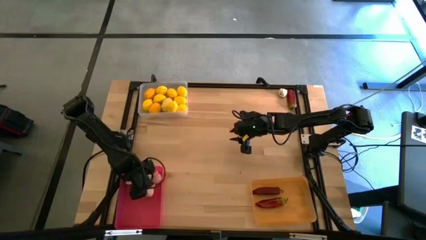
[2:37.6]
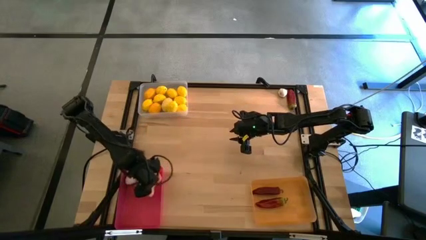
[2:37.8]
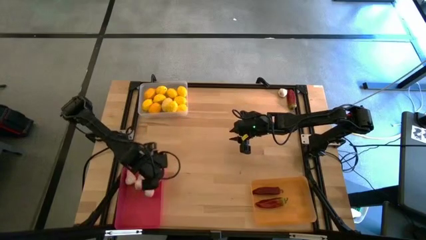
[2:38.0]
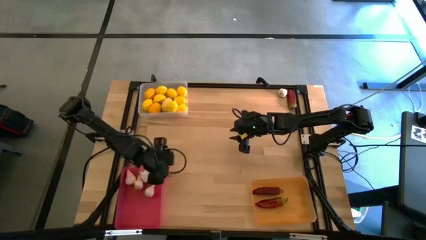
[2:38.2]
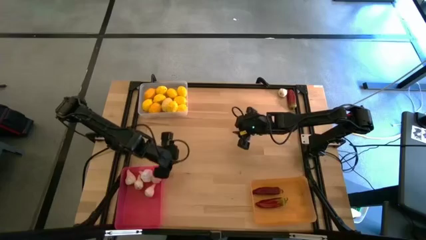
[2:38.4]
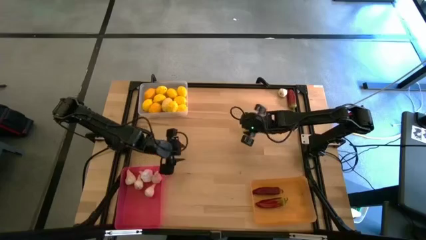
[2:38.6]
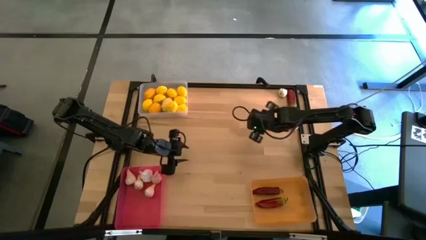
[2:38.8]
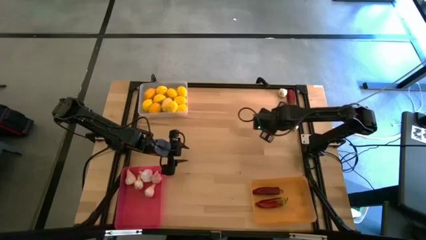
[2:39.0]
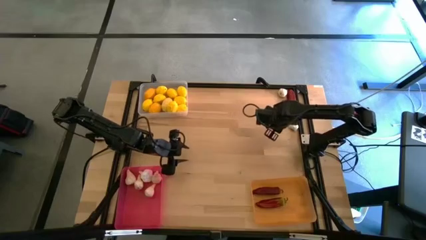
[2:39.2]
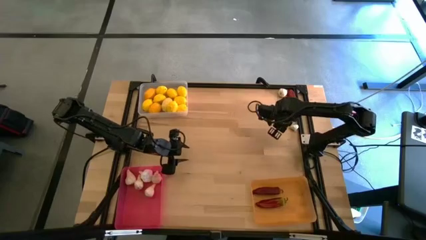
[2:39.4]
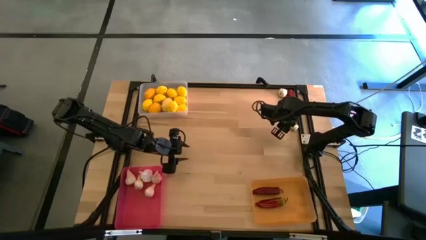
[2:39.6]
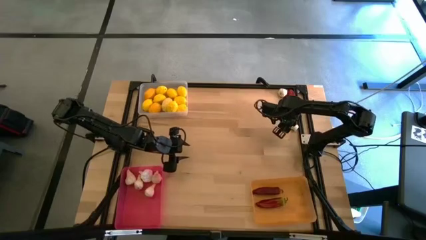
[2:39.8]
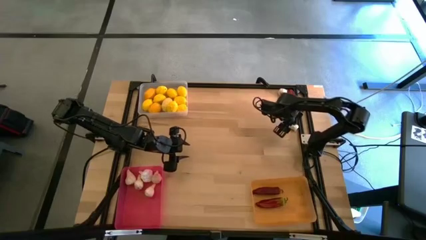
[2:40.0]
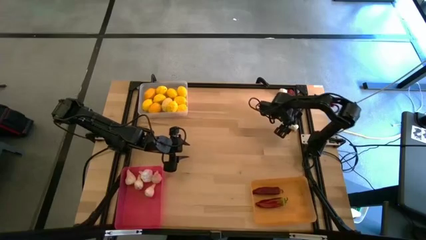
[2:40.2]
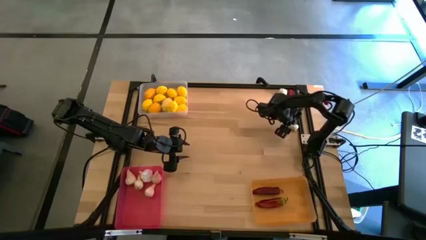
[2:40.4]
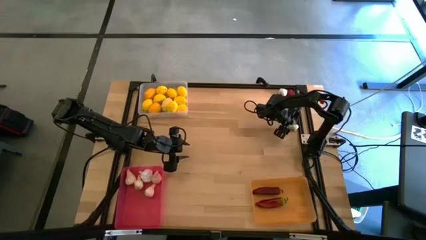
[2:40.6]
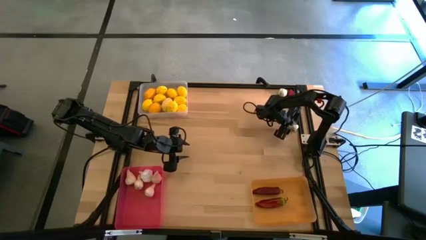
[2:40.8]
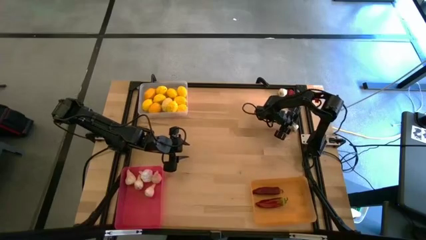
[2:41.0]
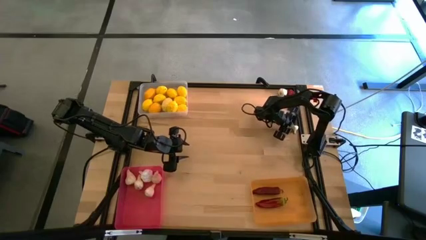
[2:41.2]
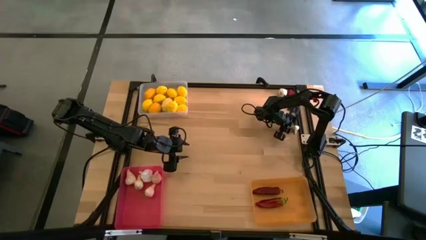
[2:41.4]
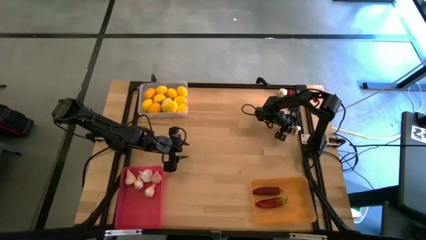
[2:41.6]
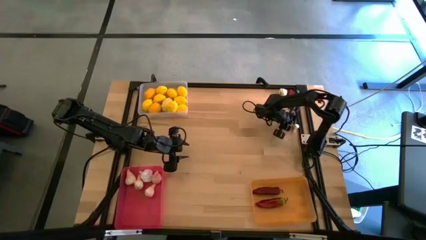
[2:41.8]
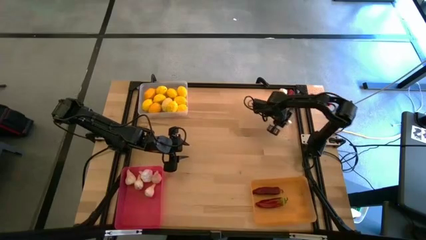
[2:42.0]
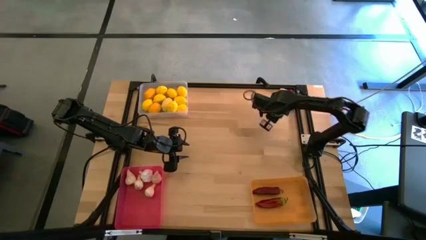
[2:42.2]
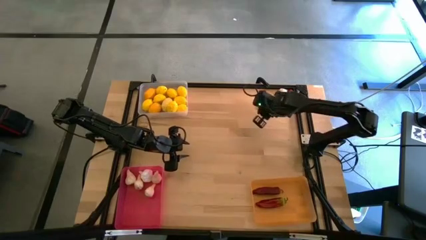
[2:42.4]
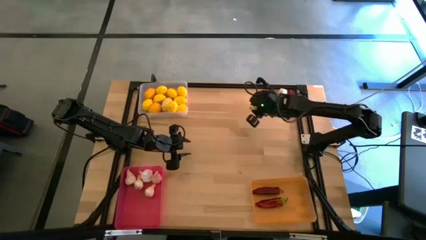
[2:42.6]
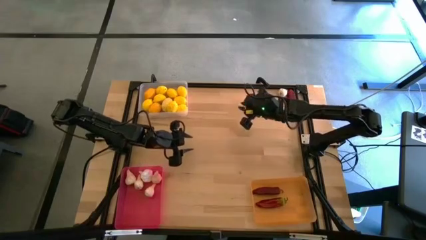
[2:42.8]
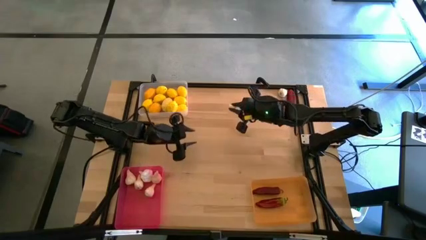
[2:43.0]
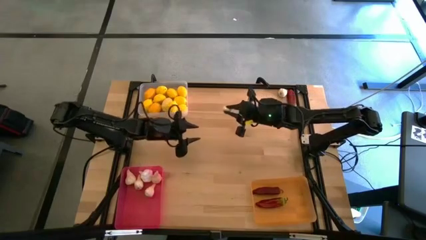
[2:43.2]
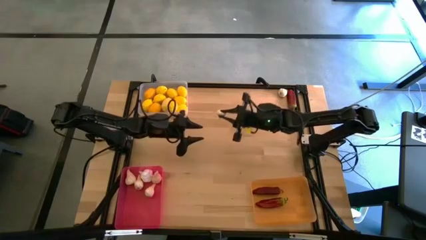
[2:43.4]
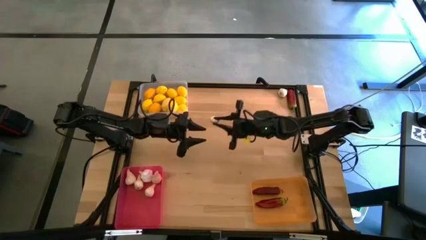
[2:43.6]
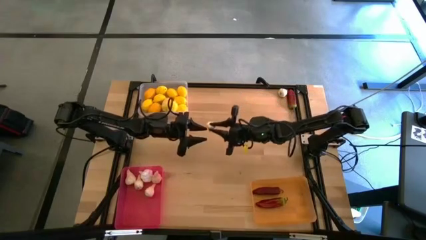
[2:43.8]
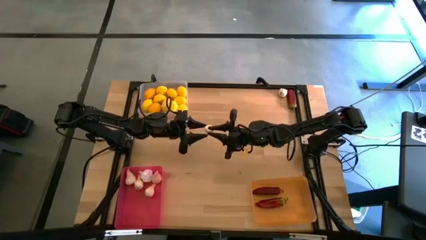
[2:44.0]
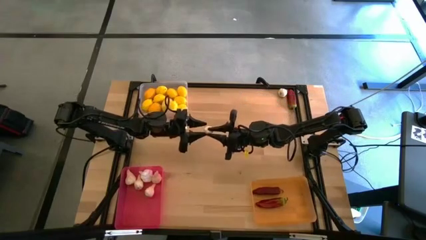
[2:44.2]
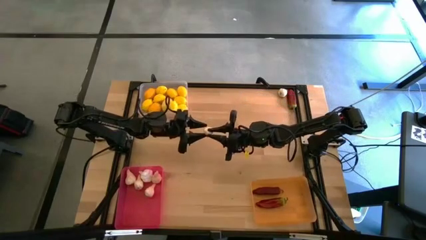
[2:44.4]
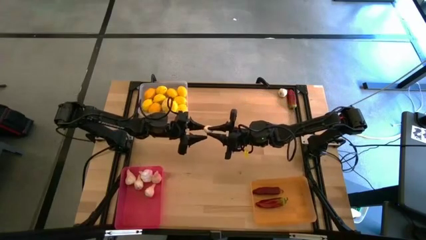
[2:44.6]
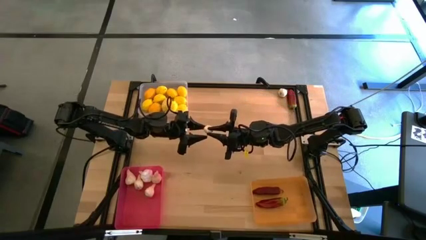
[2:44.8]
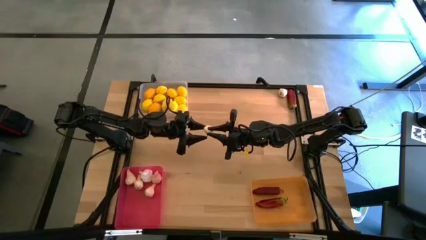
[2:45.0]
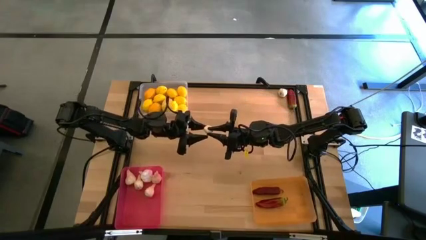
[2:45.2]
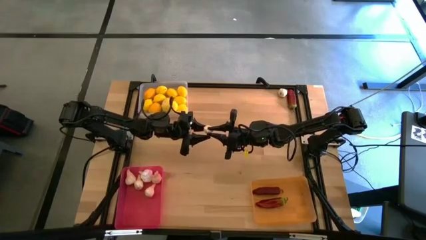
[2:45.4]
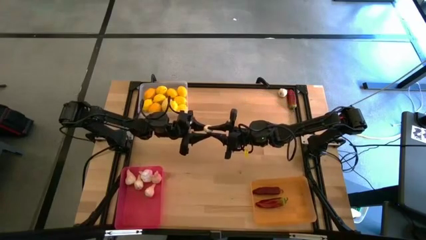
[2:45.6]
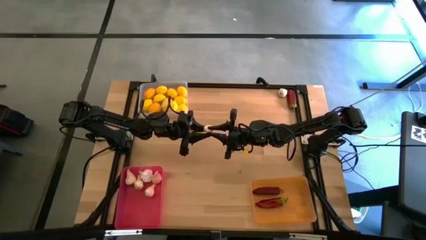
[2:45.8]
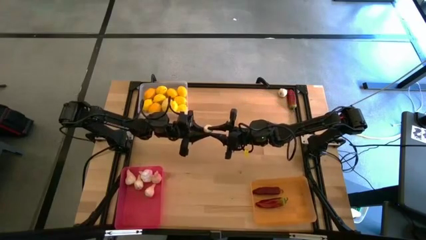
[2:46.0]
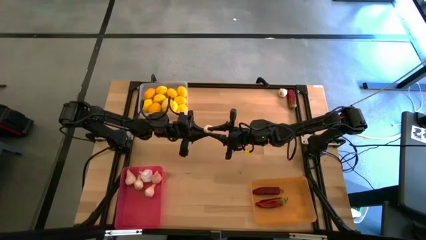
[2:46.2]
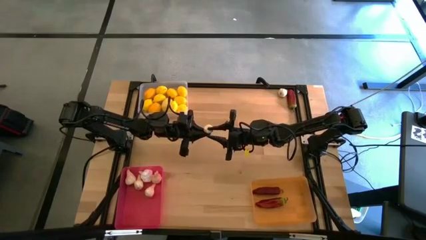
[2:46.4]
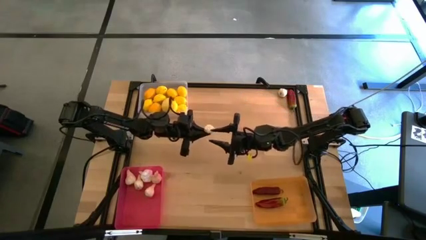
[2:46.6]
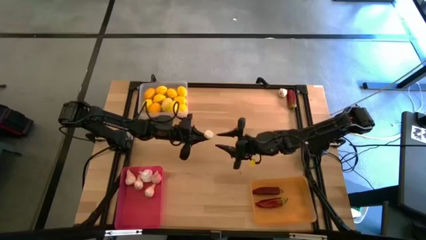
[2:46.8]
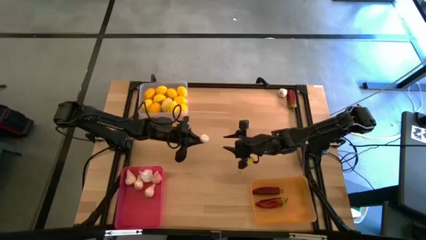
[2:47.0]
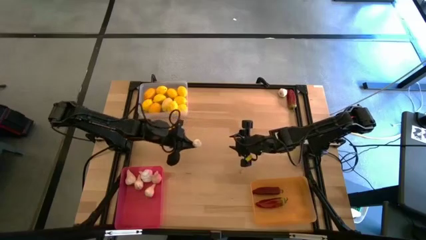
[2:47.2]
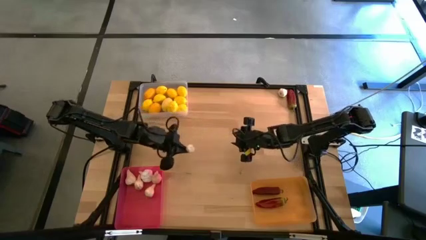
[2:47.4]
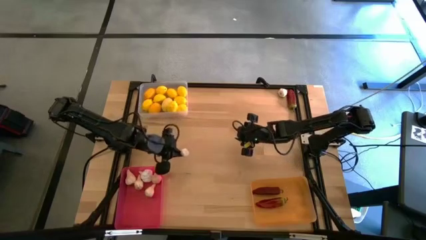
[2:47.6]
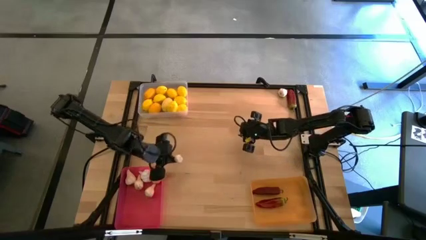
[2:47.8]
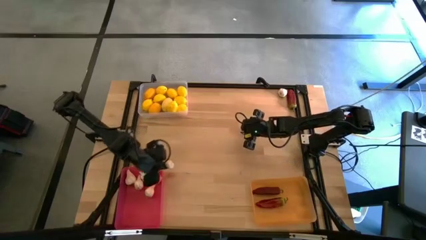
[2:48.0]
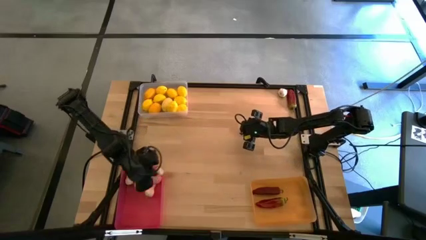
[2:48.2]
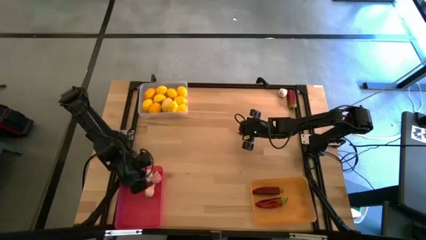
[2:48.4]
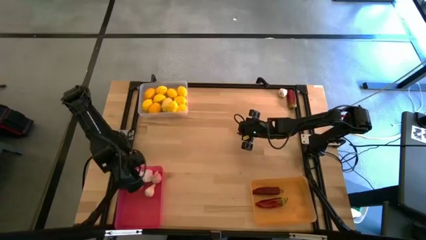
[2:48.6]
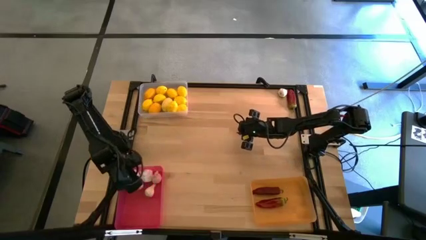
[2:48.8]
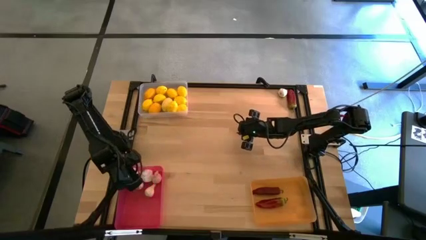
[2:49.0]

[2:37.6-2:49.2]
Task: Sort produce into baskets
Put the white garlic into the bottom left red bin

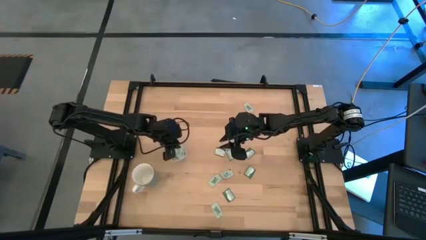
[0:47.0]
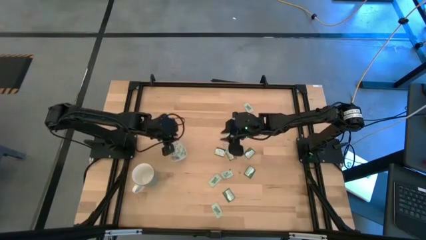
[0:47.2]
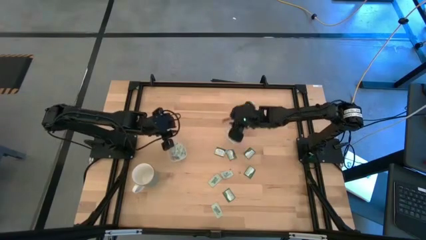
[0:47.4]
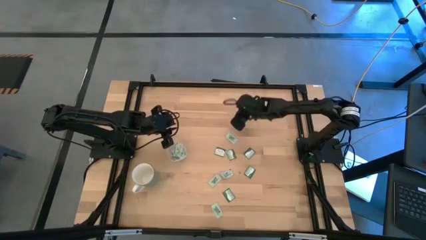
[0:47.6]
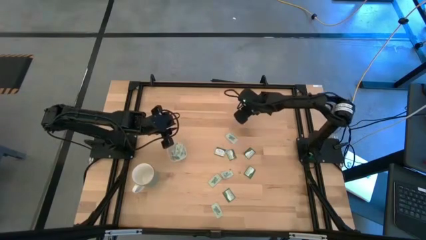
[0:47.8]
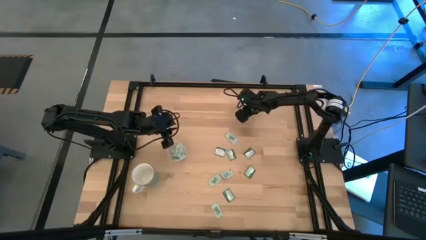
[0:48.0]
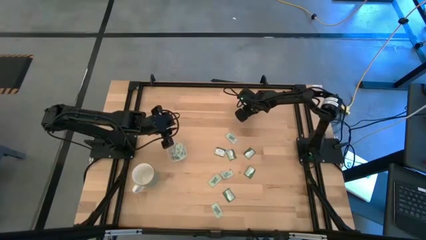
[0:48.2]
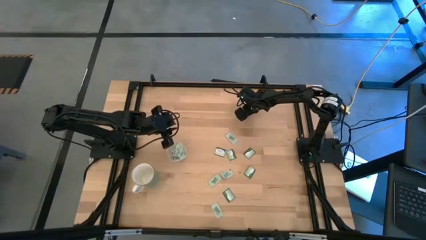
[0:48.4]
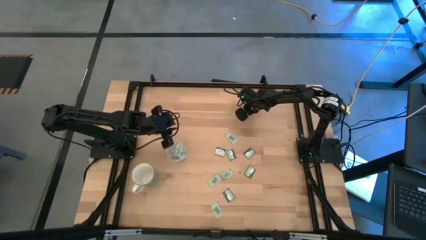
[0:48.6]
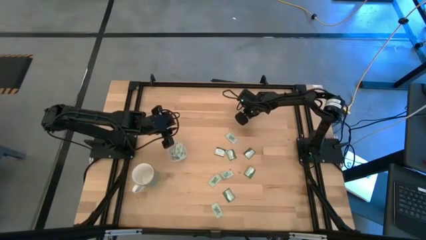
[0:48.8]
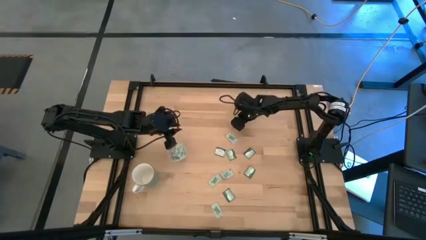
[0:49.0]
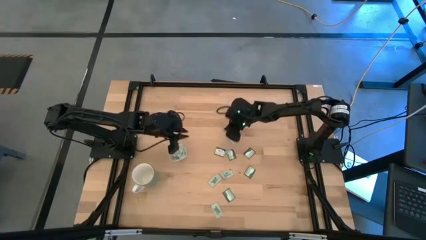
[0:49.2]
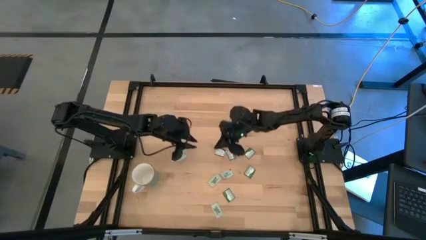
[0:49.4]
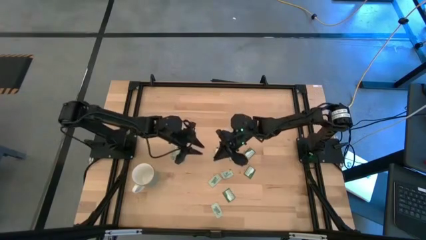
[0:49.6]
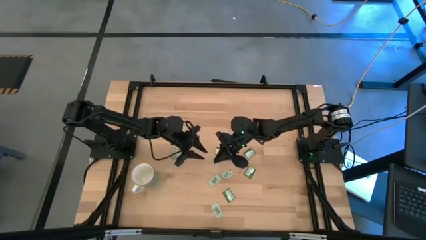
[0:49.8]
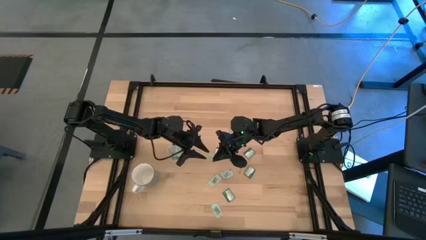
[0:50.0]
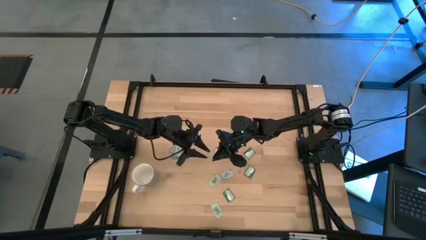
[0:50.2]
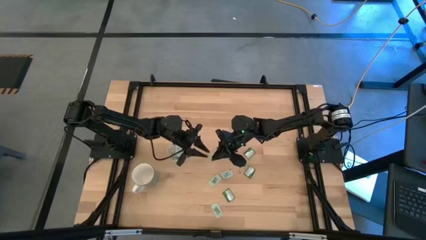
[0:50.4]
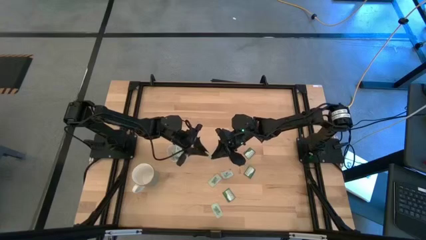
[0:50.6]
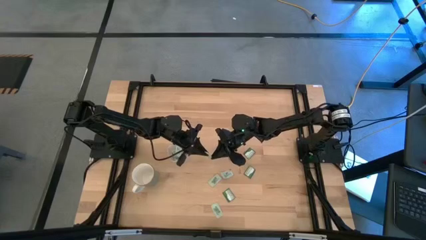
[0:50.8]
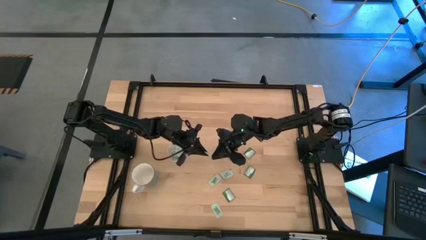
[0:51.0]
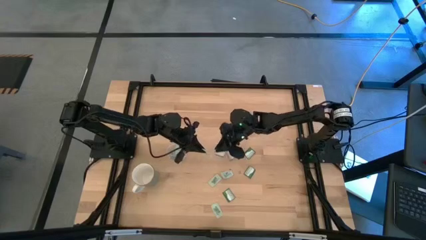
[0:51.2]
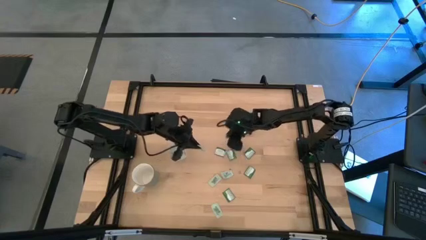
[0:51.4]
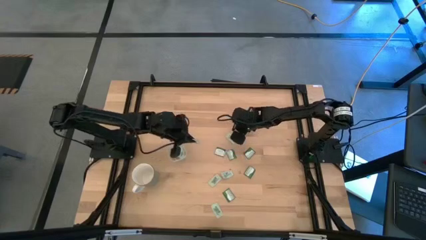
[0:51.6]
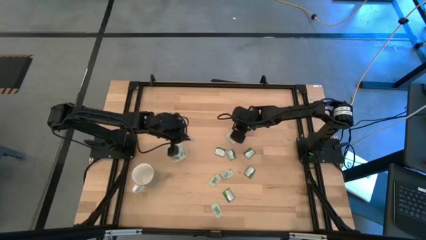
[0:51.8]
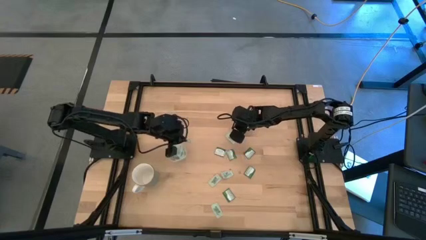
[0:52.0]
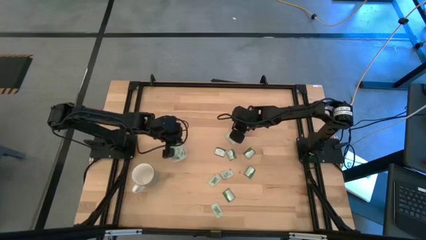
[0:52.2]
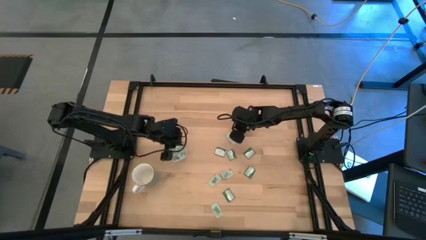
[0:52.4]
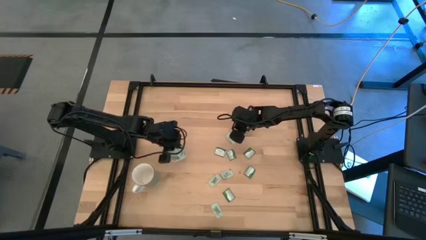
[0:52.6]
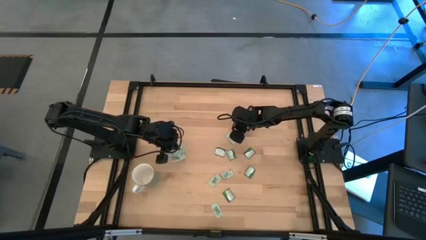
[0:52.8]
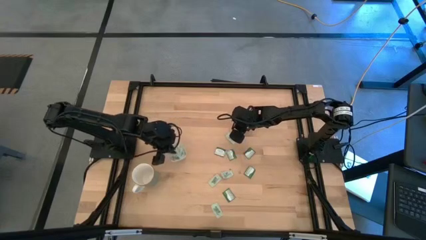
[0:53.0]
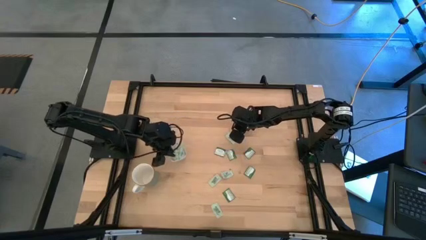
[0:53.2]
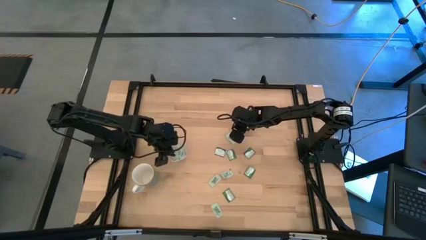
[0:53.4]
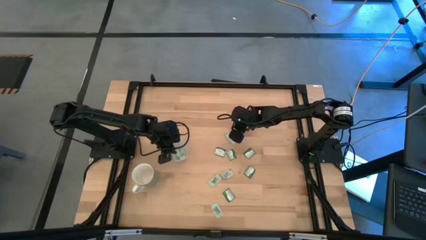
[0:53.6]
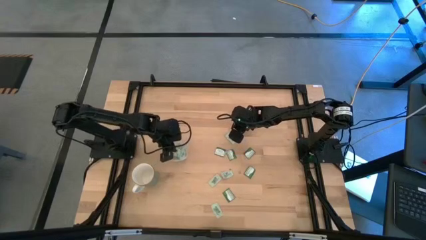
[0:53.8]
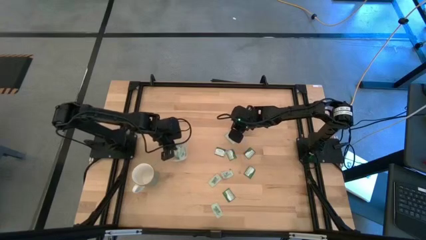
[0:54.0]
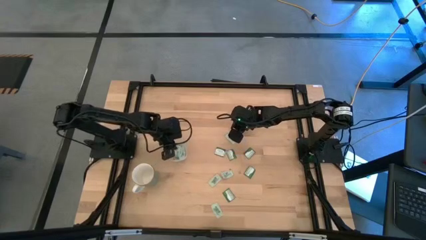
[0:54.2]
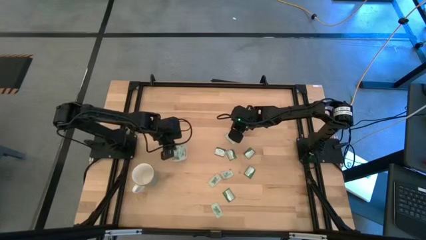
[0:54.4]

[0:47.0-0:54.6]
Task: Pick and place Stevia / Truvia into bins
Put the green stevia packet into the transparent container
